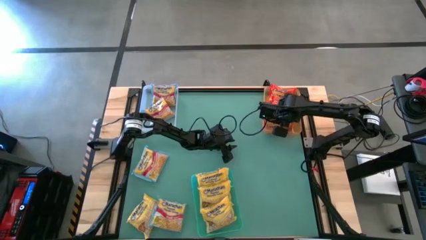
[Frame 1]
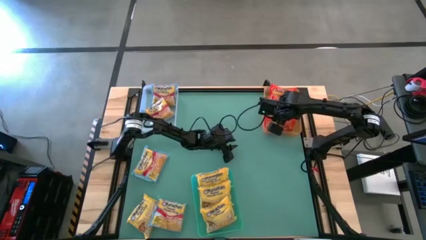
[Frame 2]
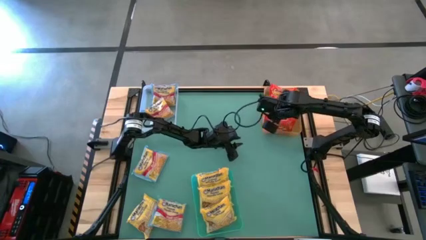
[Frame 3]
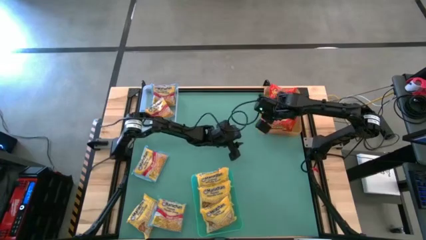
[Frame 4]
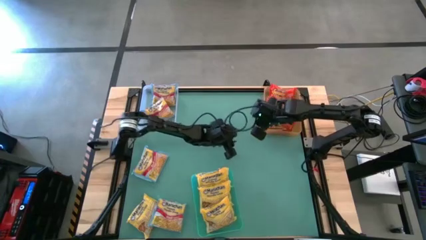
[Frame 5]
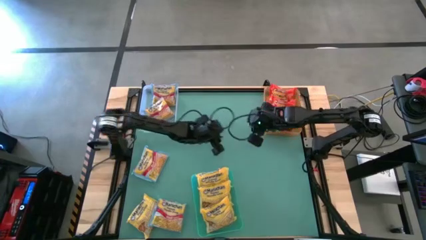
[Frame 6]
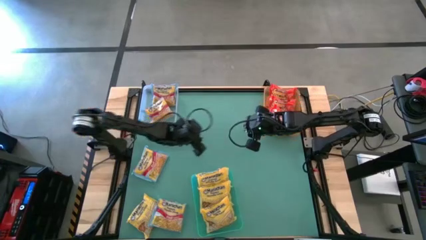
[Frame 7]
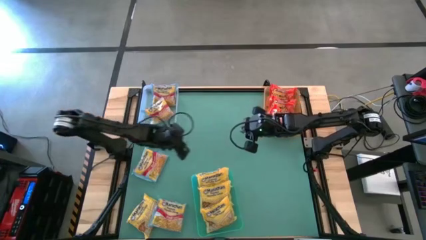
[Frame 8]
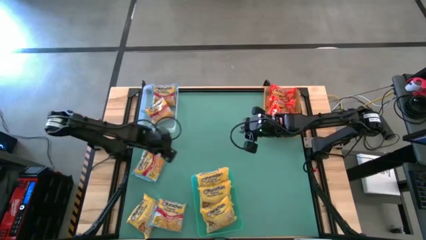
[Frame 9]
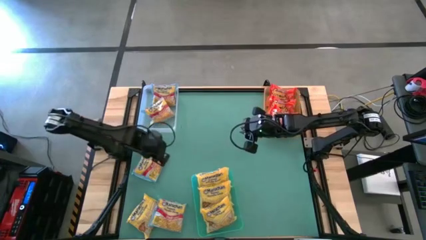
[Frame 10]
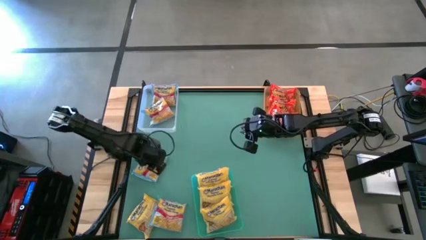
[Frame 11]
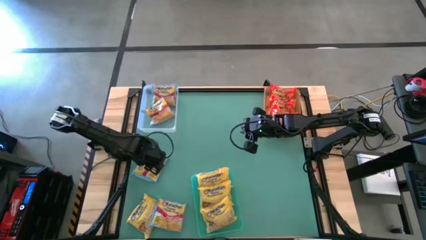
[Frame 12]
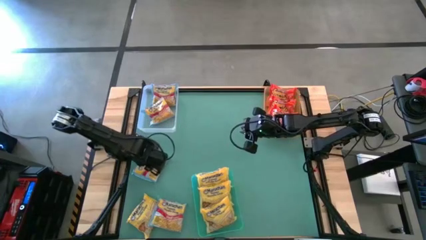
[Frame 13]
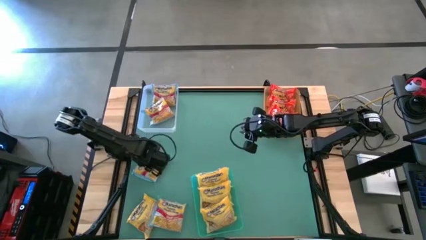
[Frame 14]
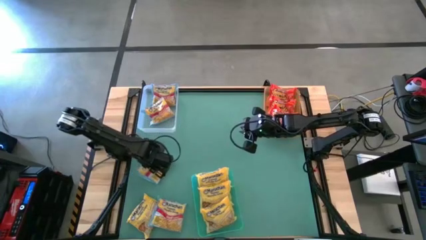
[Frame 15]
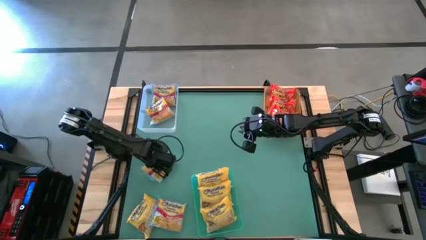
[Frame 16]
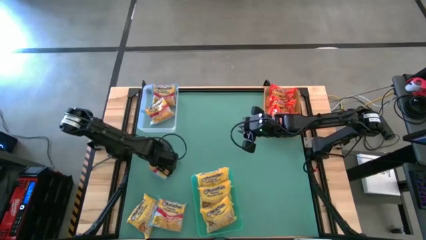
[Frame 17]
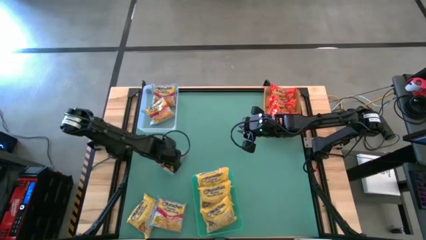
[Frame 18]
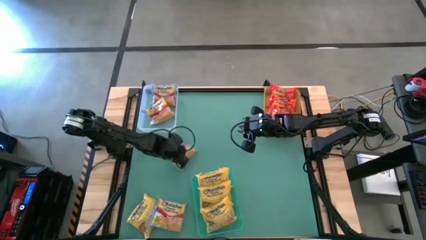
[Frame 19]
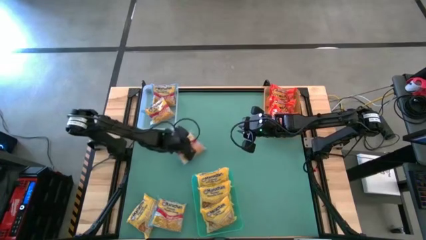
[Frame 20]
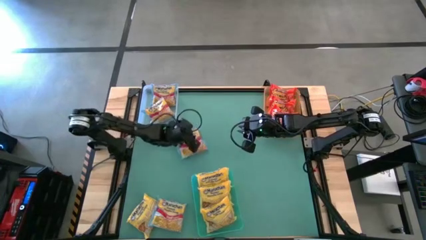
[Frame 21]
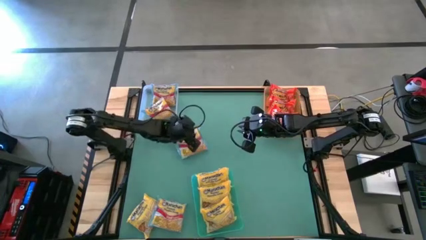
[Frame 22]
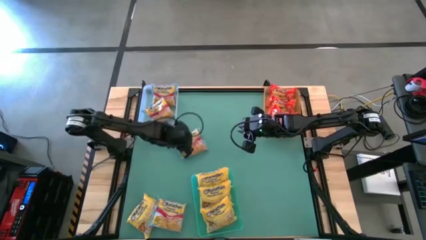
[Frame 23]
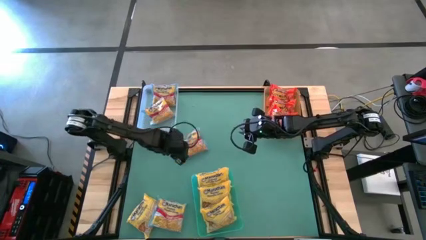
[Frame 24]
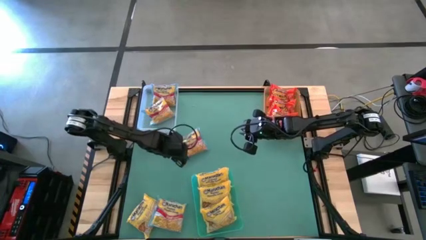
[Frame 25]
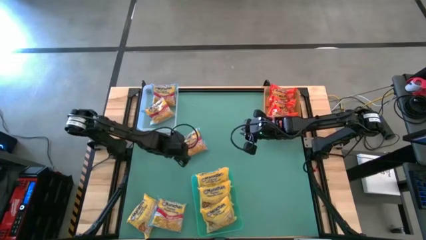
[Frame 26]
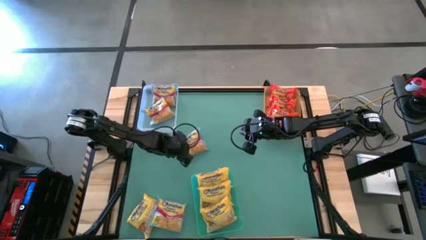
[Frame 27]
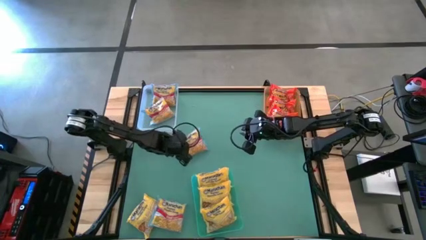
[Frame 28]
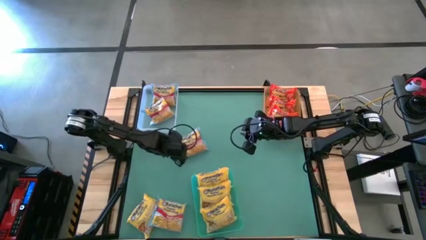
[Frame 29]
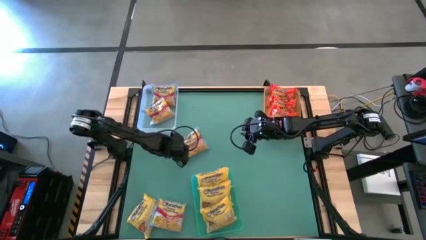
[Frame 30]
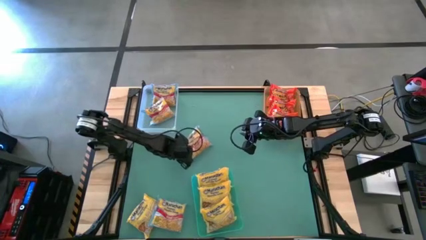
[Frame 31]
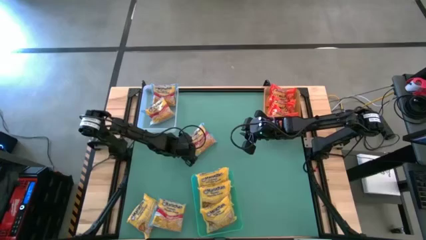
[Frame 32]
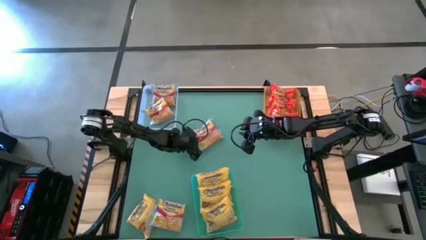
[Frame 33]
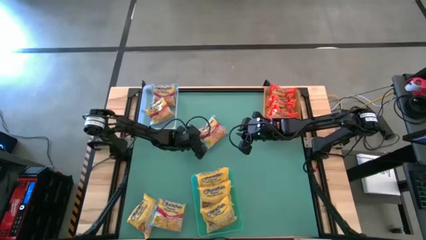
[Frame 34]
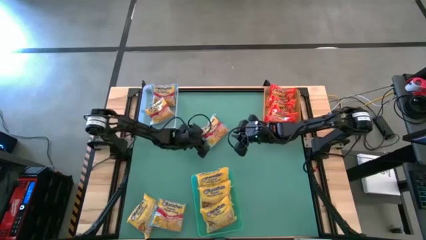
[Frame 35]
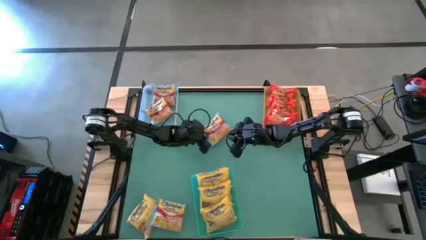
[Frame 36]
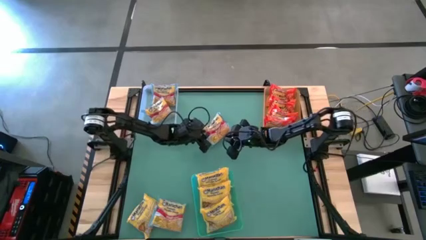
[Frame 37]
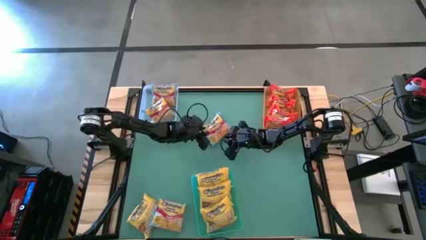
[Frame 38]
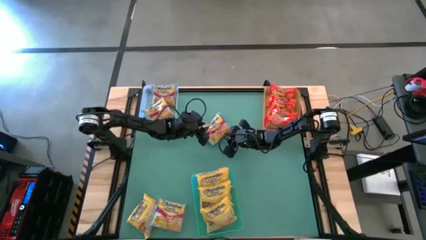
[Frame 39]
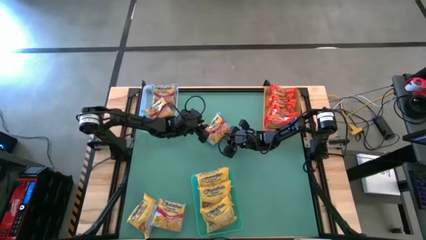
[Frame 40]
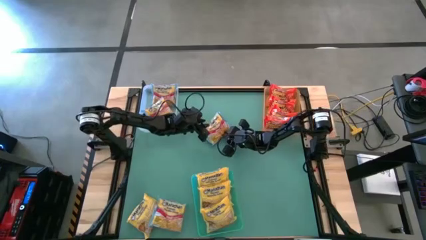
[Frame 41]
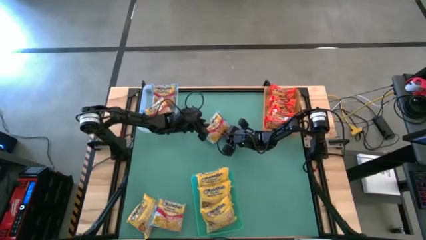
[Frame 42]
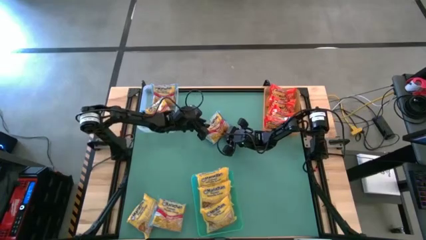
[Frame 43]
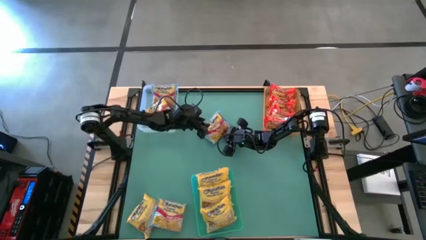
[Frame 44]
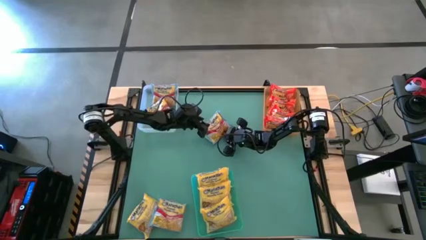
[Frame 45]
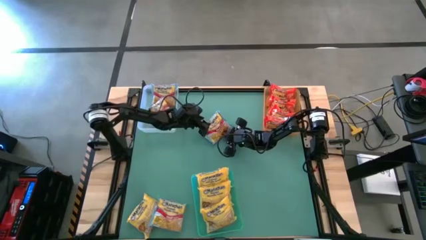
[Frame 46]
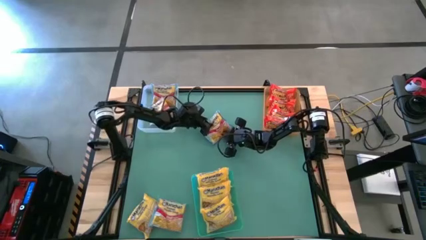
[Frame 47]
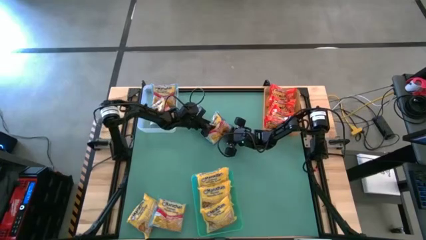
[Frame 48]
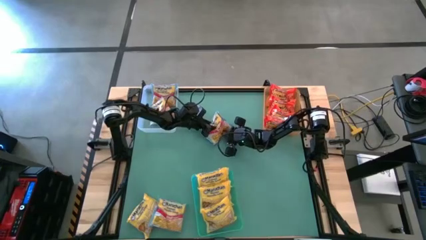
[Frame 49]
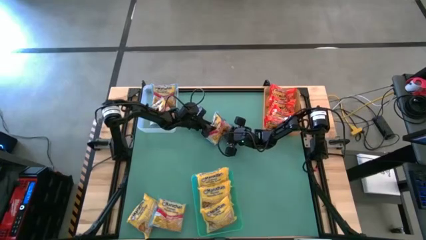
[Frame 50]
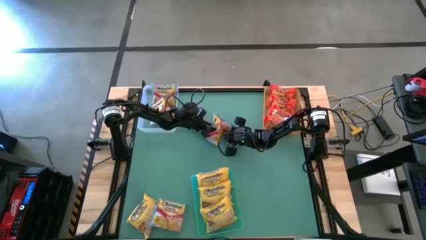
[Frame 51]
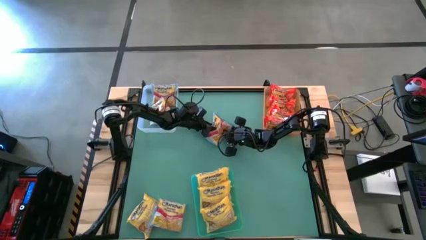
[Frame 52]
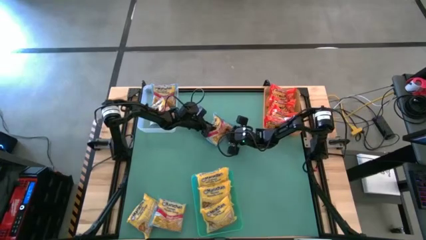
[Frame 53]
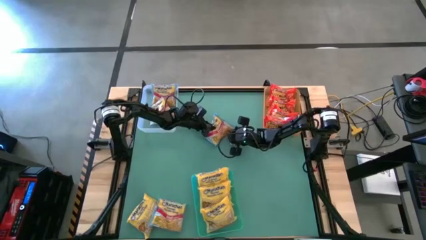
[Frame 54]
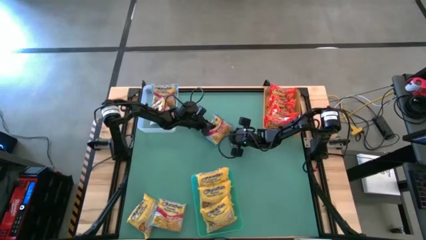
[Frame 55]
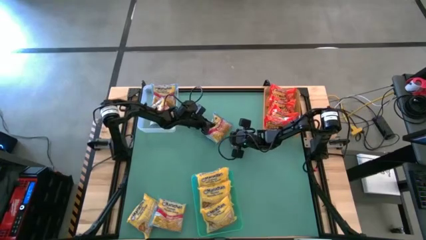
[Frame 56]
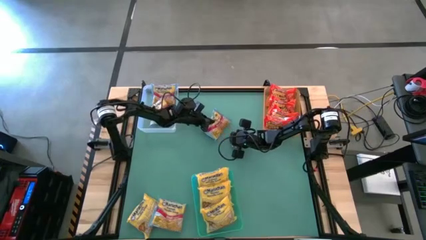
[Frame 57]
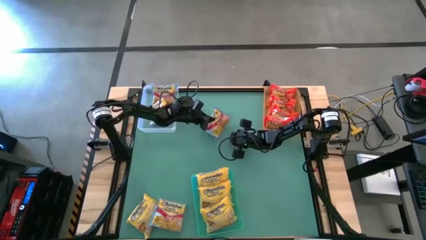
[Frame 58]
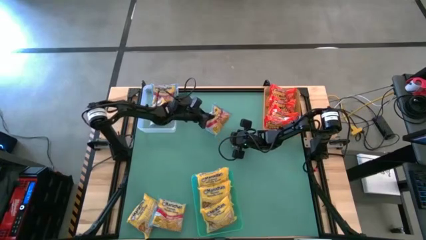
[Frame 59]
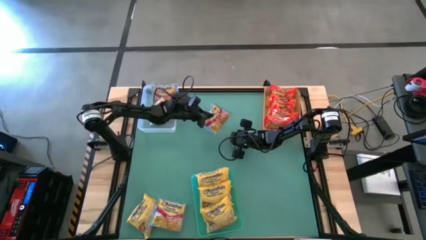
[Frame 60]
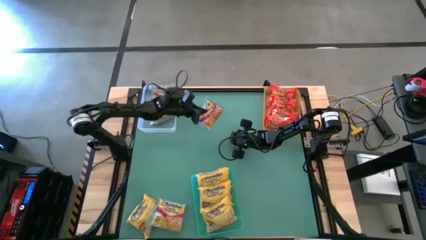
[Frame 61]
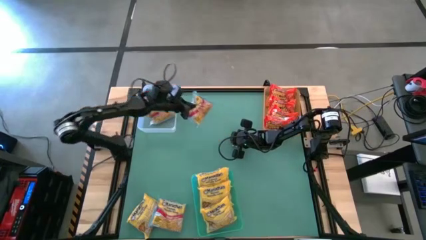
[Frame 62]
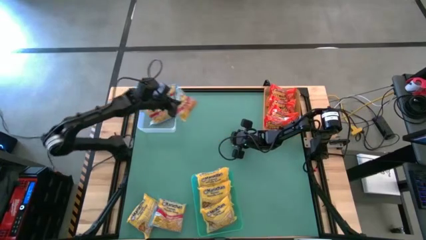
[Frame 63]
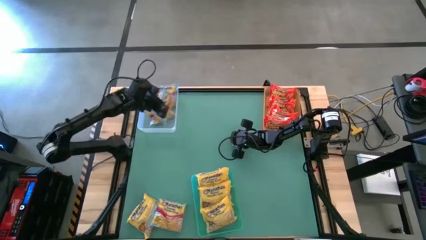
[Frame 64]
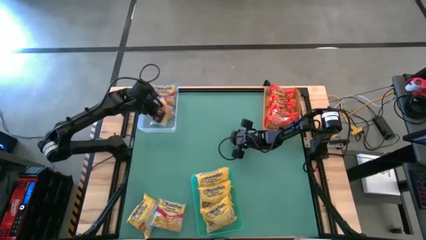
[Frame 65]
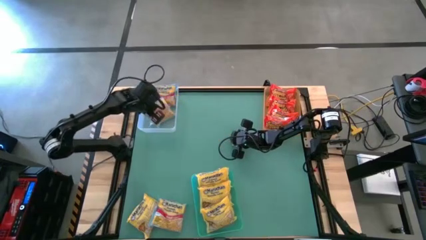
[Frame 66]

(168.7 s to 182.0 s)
Task: Sort Maruchan noodles
Put the top blue noodle pack into the transparent bin
